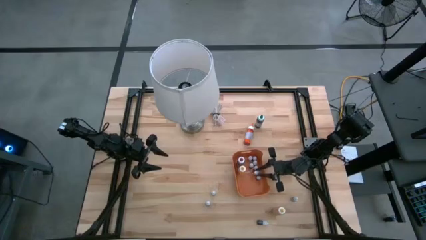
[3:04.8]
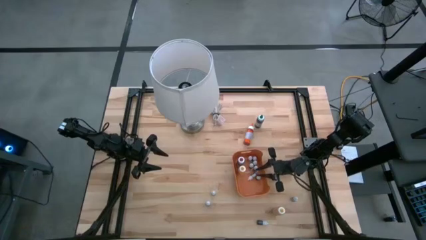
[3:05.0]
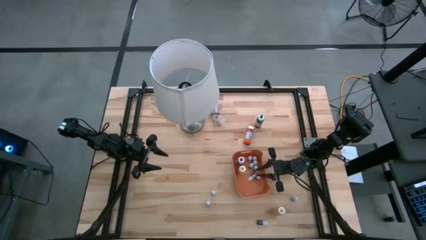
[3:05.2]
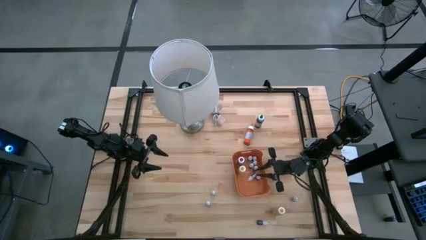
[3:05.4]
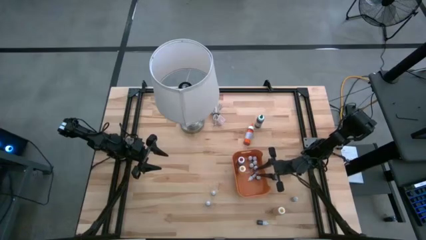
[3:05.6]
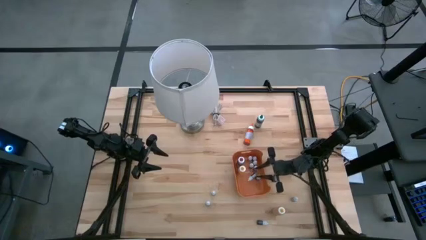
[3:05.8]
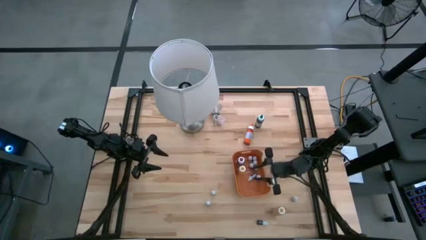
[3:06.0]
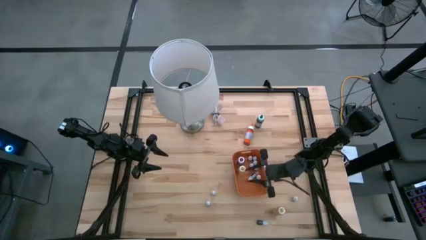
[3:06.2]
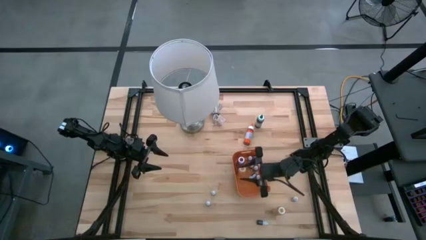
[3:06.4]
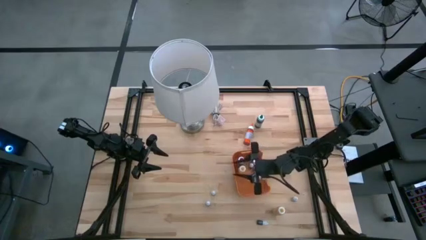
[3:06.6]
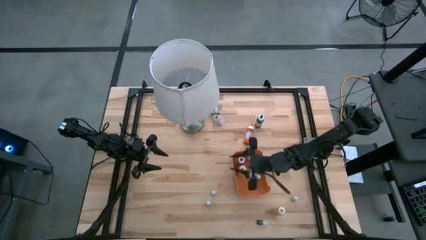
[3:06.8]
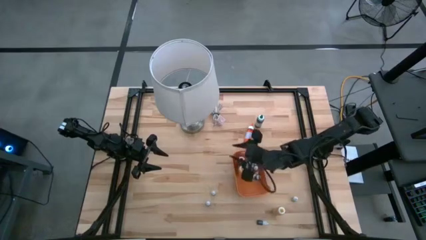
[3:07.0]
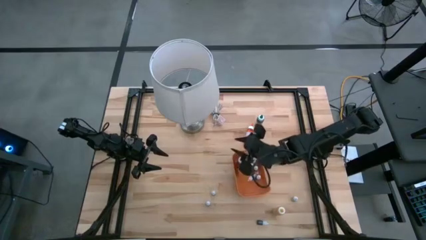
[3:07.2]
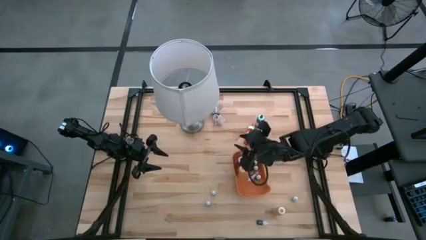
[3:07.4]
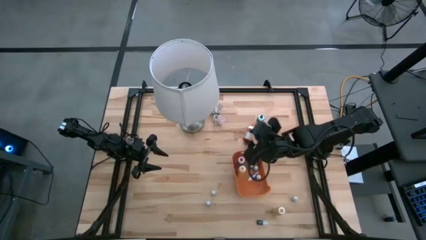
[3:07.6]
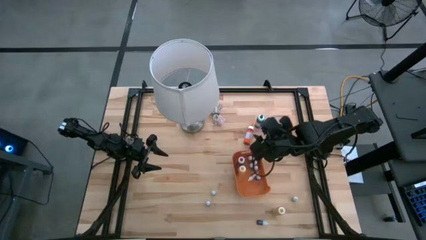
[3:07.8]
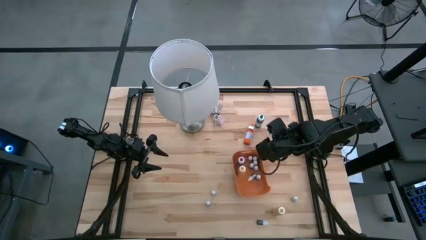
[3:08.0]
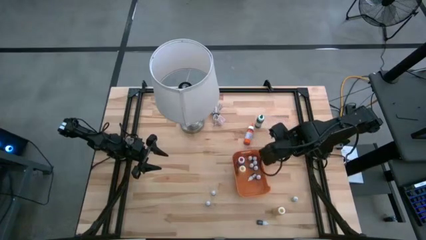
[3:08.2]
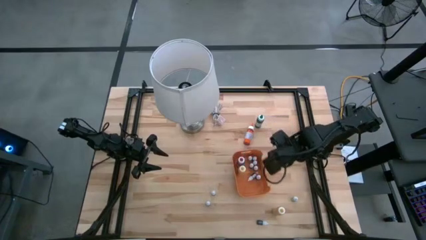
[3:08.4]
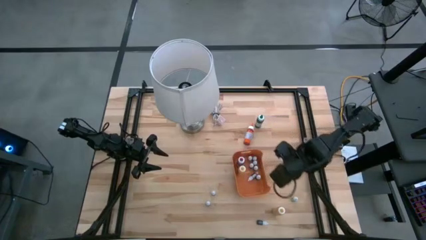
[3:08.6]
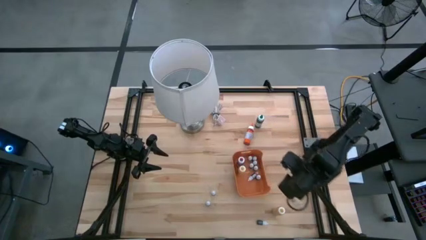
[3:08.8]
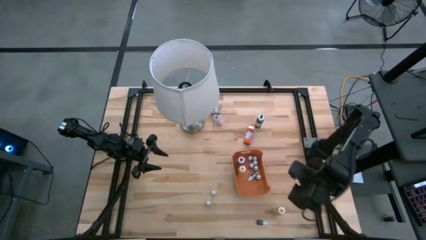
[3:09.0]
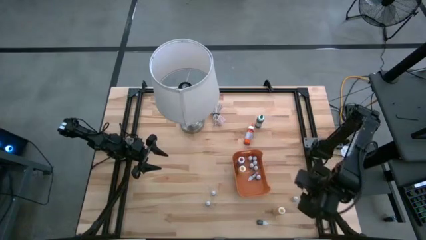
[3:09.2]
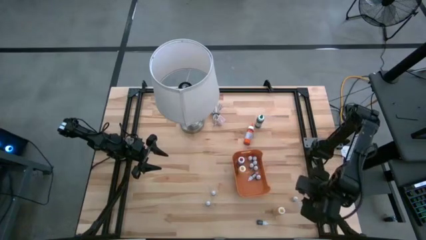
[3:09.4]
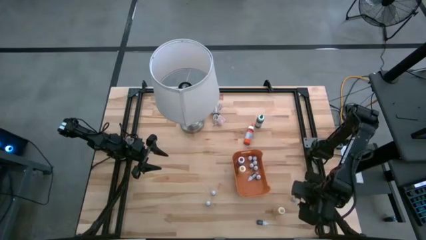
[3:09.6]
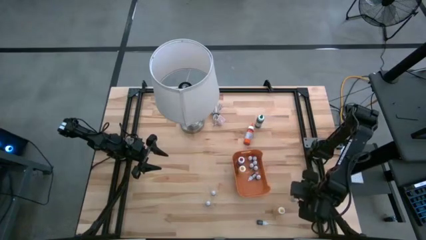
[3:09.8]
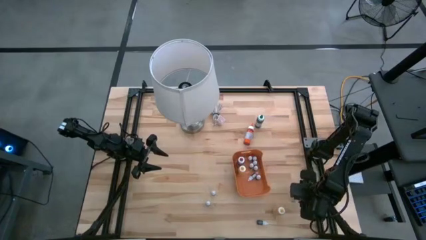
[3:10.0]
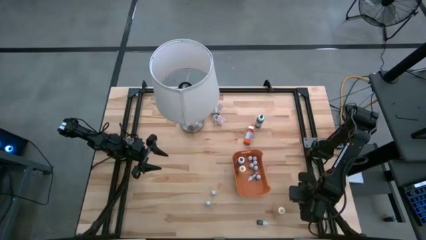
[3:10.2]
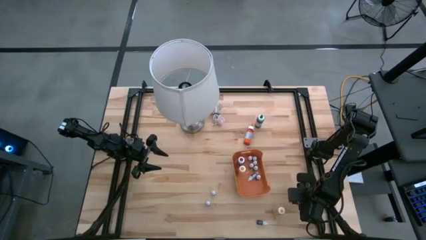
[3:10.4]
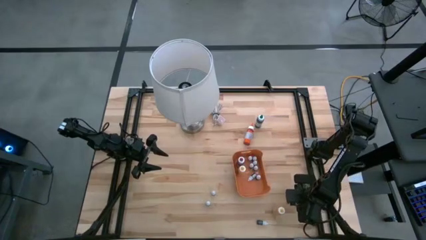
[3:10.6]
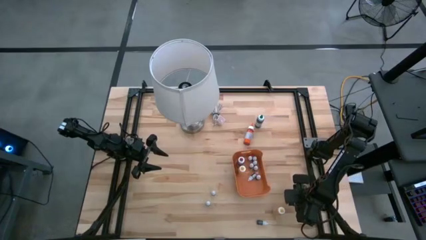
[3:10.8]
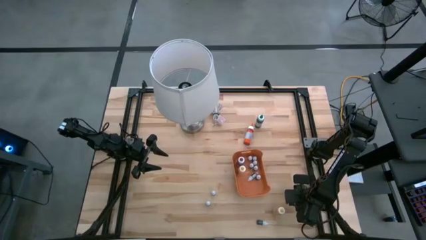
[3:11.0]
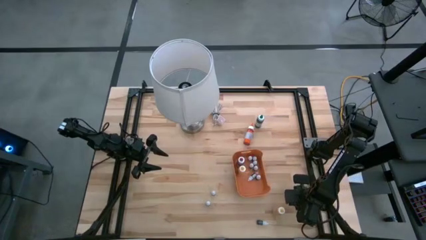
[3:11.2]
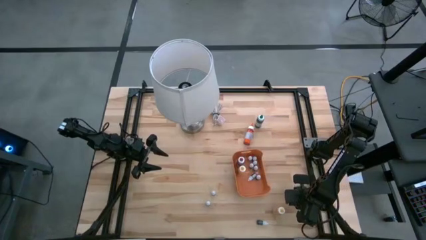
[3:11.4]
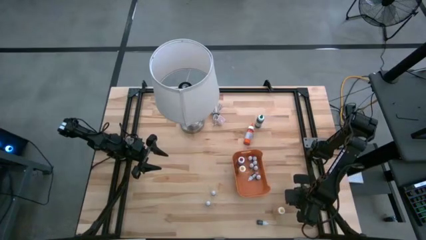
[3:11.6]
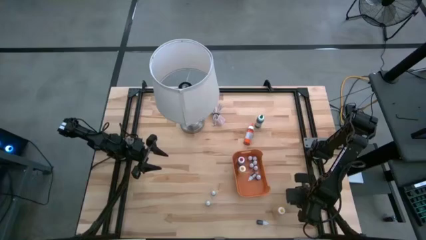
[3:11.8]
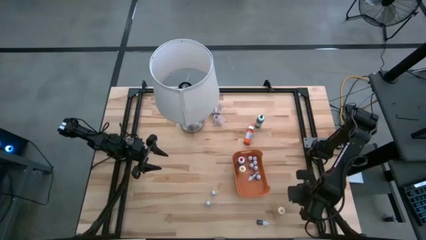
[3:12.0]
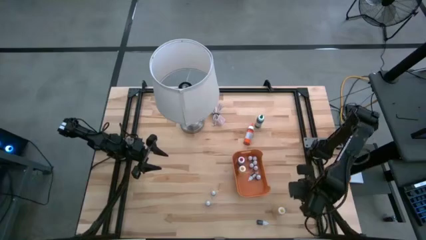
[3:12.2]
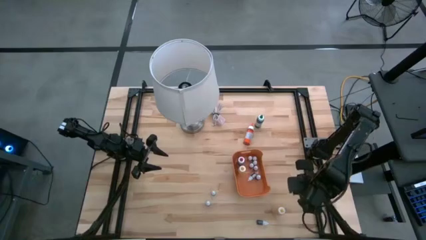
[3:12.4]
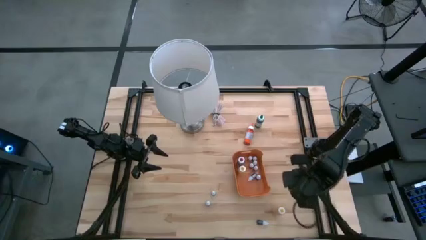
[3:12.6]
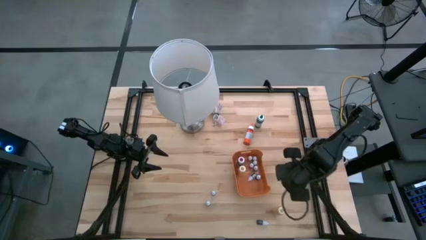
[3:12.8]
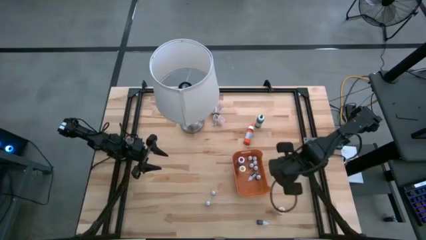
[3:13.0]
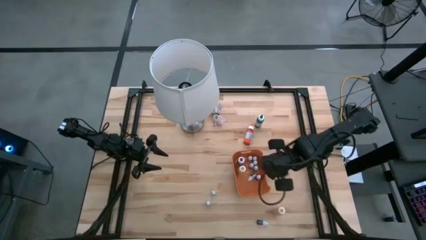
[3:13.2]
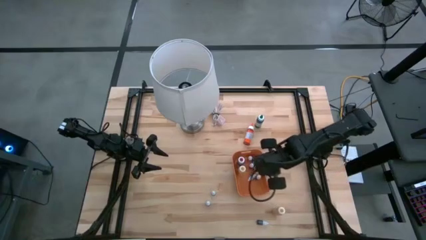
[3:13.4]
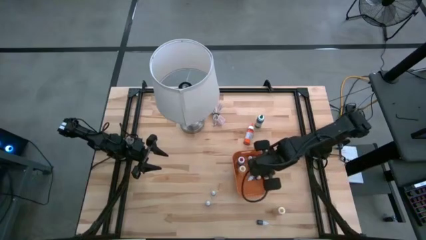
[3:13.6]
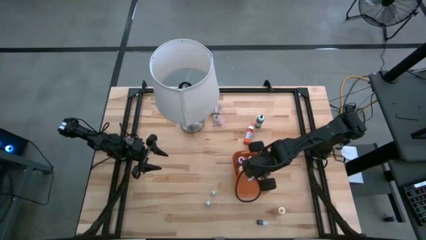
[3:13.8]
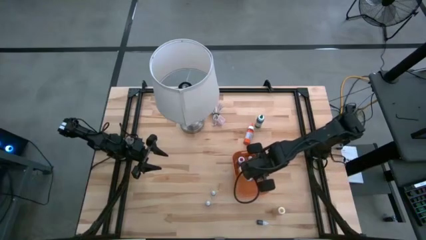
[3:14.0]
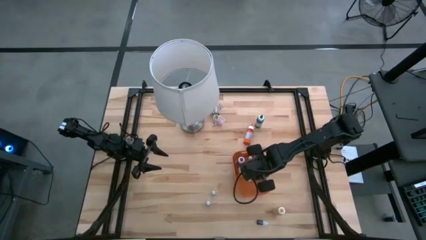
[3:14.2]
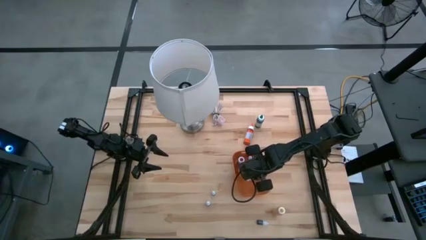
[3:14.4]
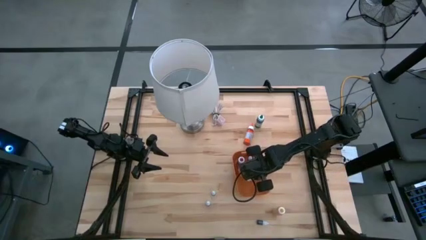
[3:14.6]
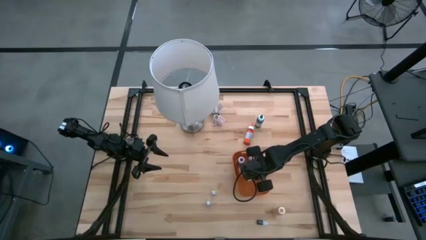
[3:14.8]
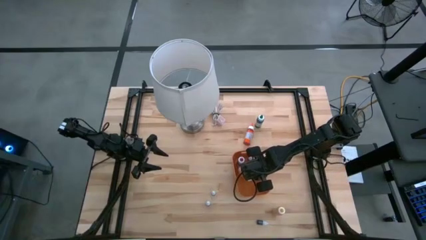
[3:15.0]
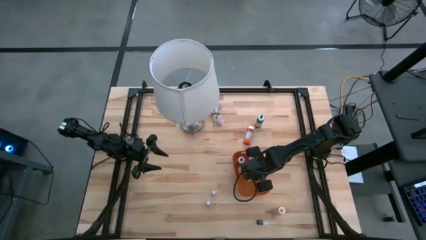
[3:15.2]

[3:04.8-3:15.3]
Task: Pick & Place food coloring
Put the small food coloring bottle into the orange bin
